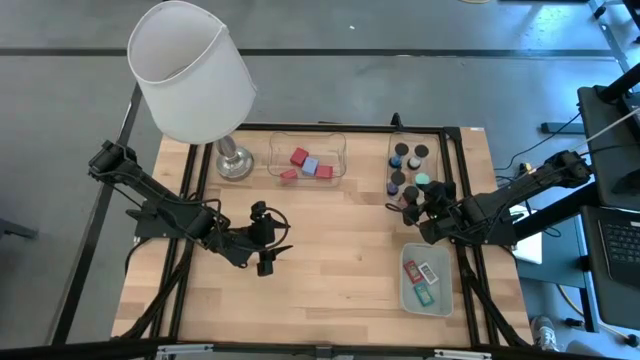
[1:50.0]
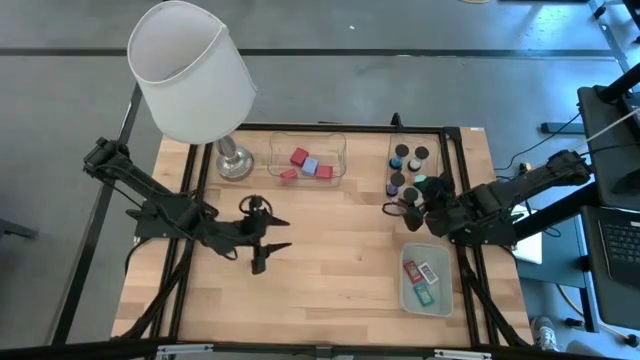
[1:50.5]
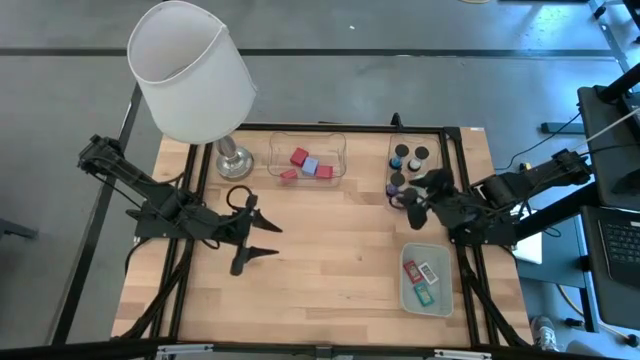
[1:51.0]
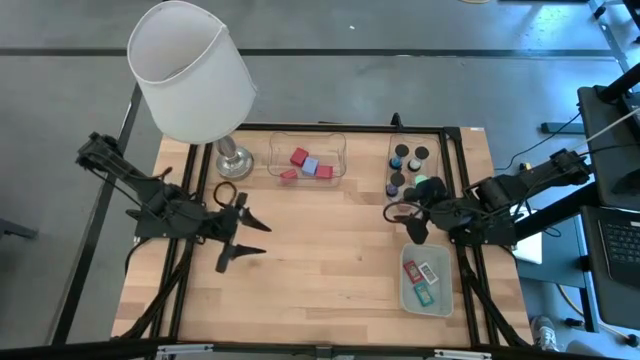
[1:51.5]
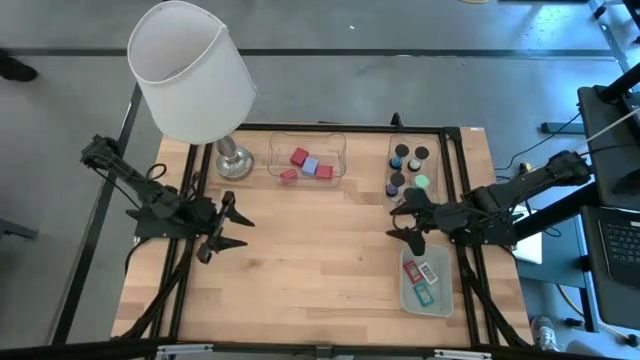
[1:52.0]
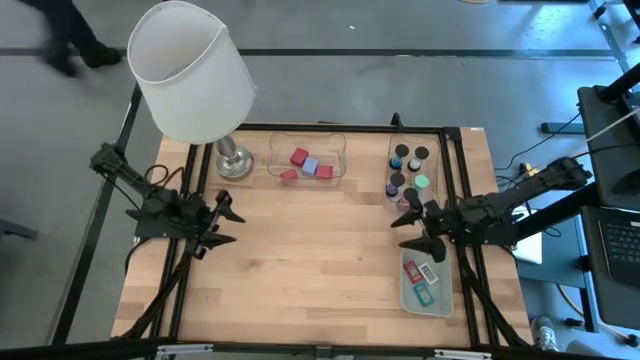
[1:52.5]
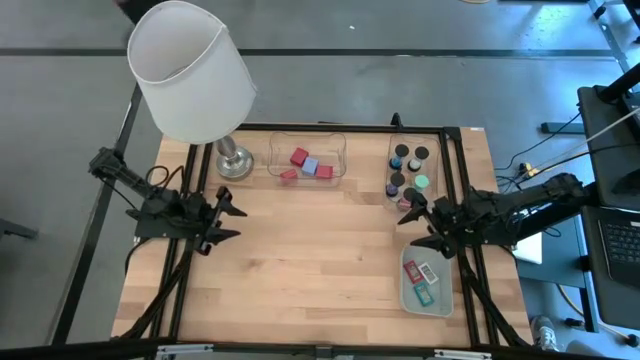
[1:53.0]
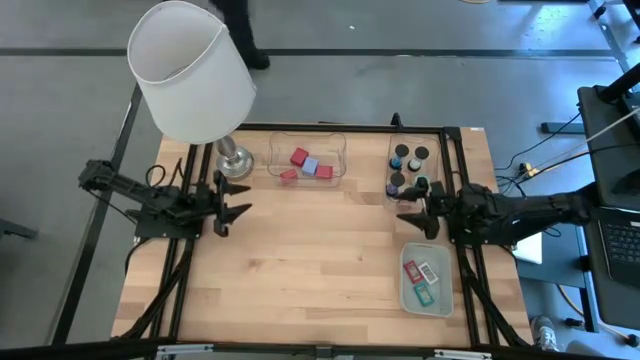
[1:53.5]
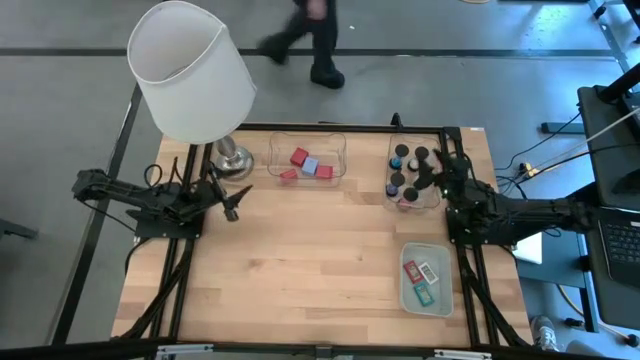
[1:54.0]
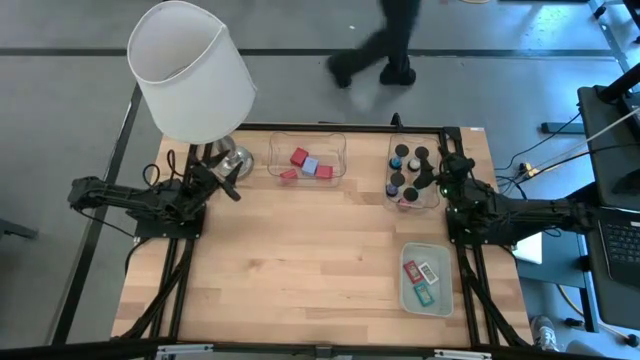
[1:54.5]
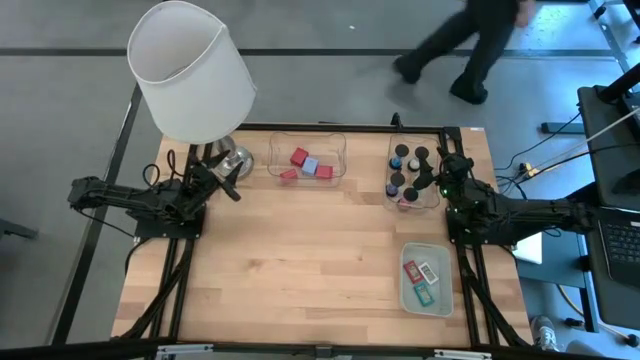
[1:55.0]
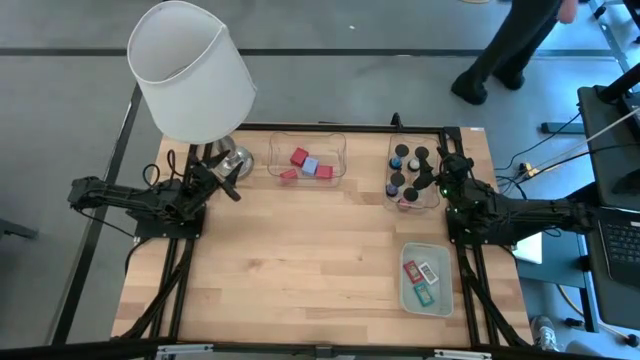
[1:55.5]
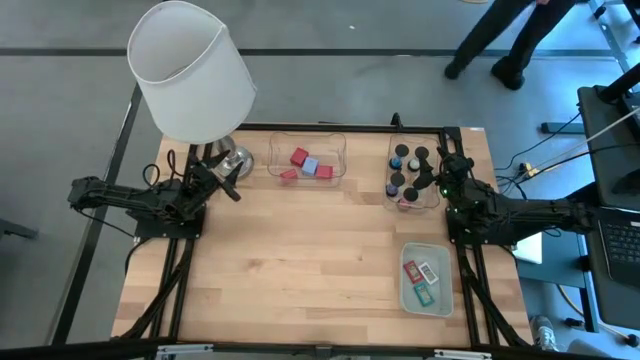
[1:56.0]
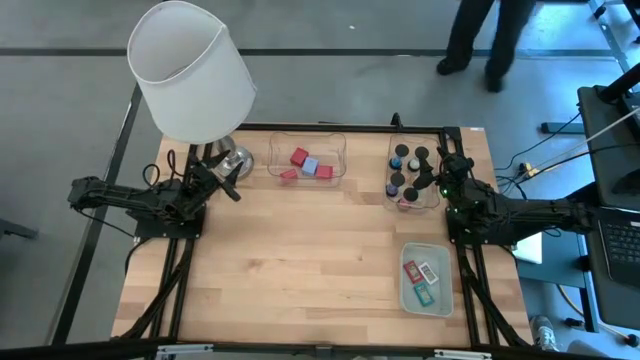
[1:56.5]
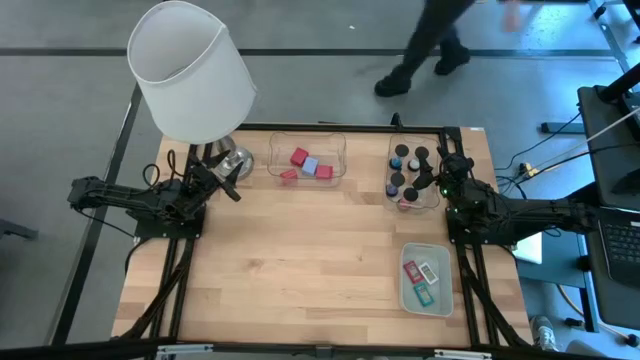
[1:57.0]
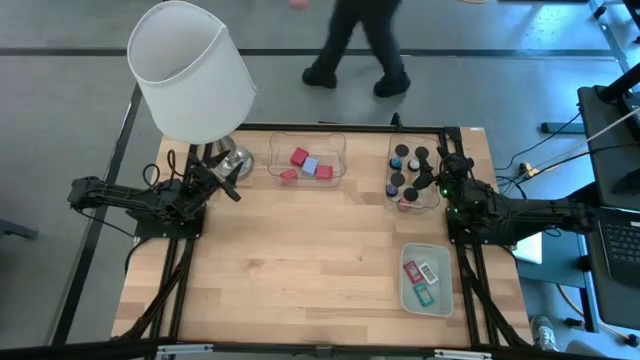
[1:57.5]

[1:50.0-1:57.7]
Task: Pick & Place Office items
Return to Home Position

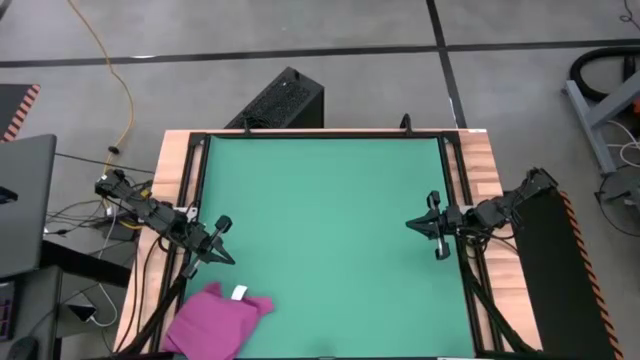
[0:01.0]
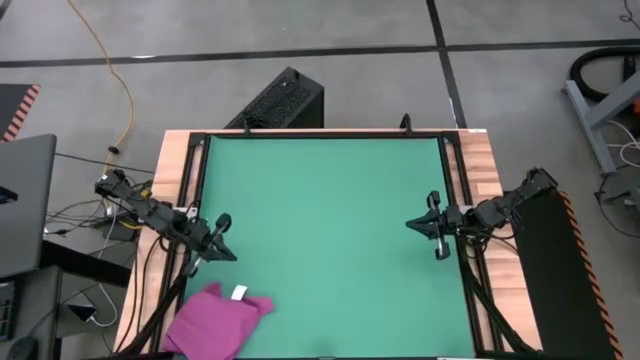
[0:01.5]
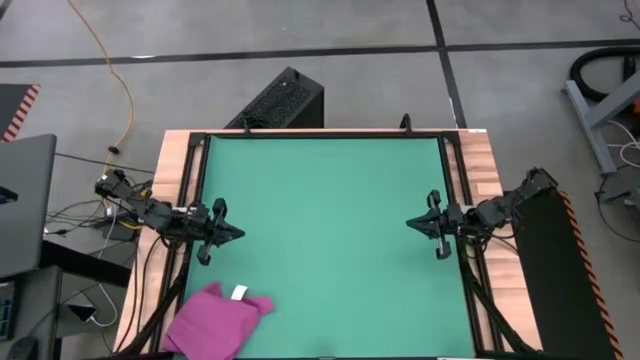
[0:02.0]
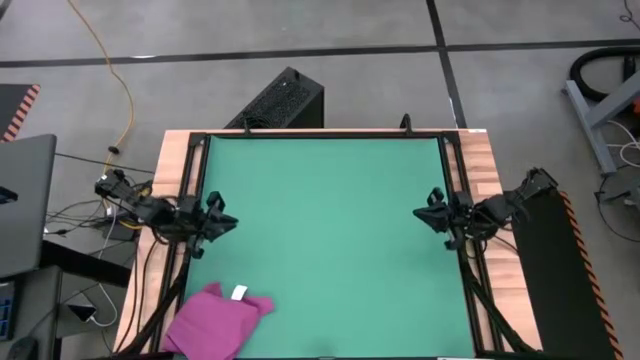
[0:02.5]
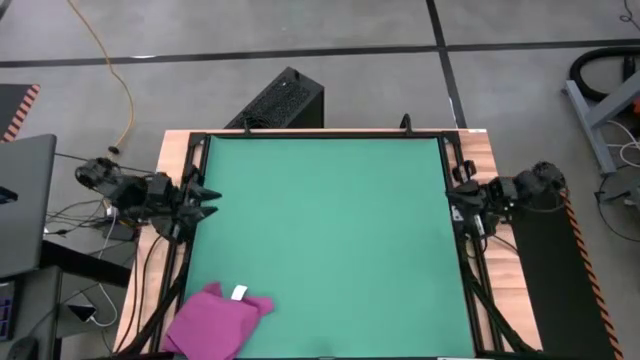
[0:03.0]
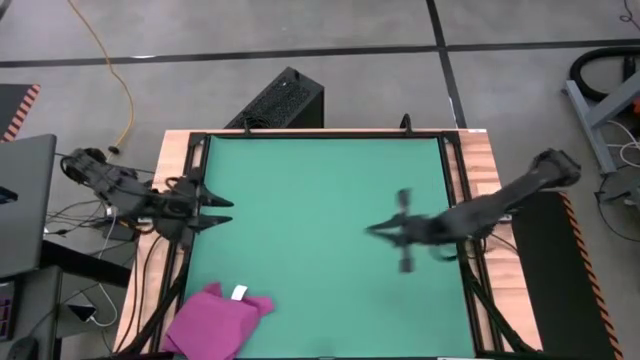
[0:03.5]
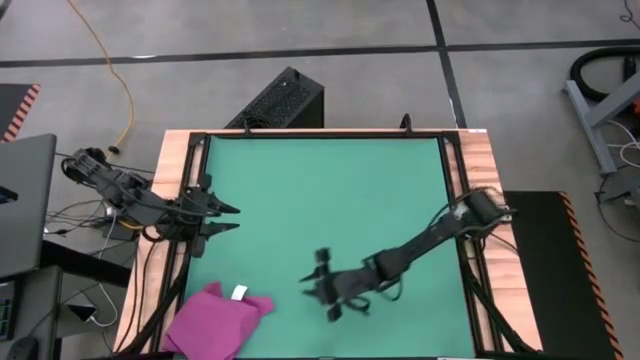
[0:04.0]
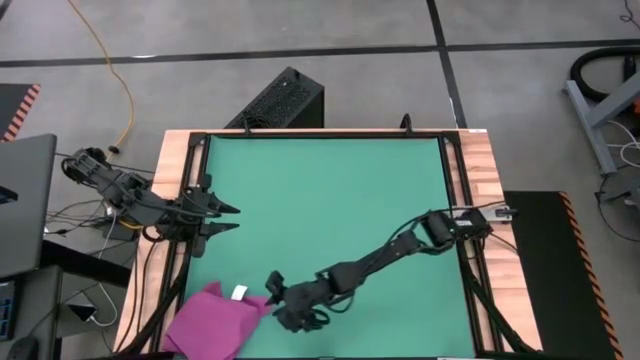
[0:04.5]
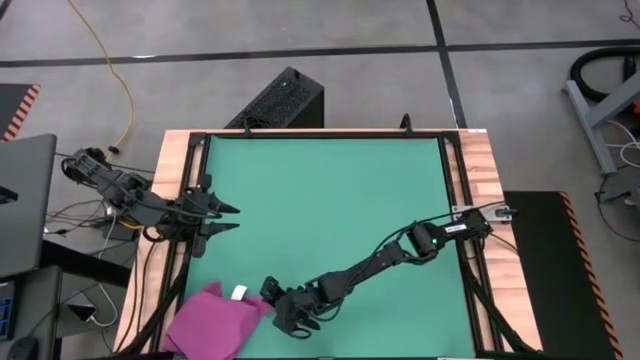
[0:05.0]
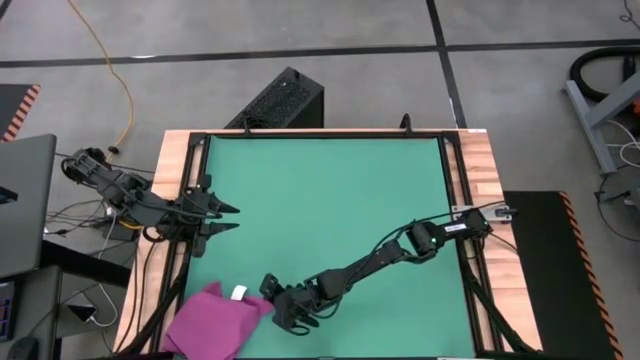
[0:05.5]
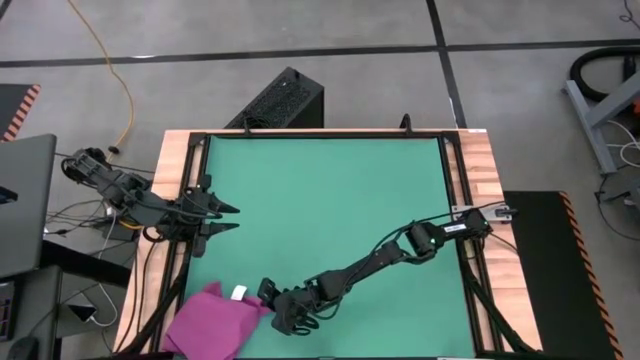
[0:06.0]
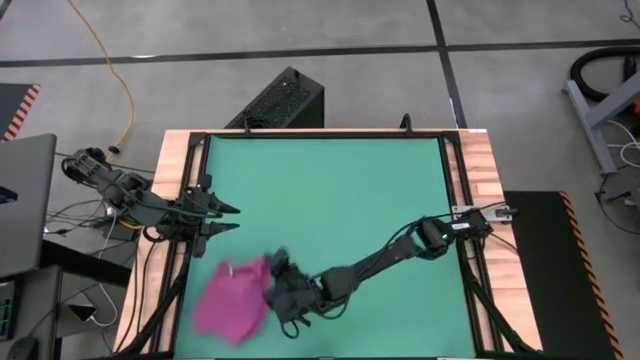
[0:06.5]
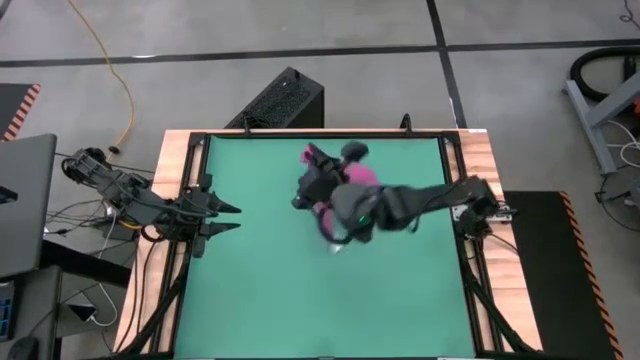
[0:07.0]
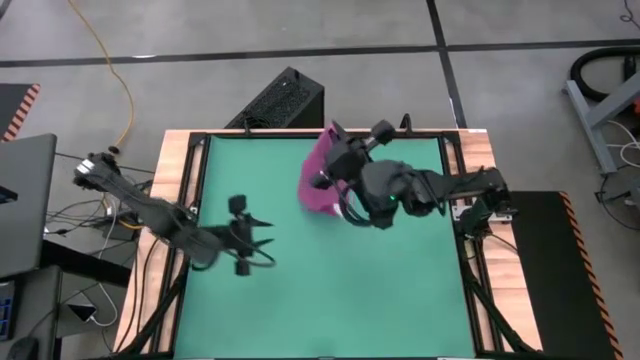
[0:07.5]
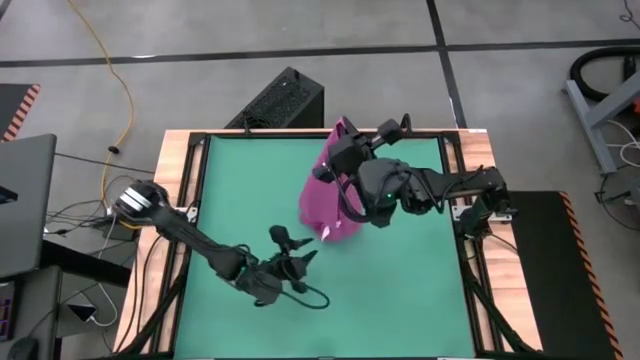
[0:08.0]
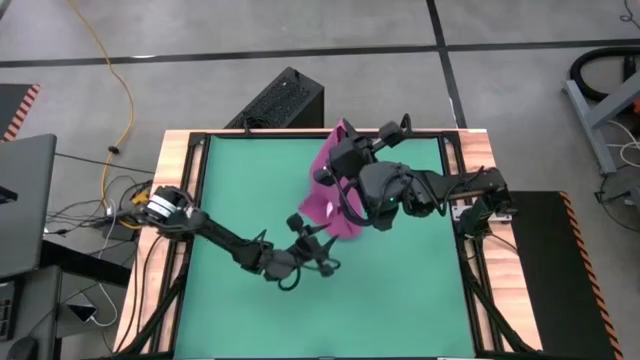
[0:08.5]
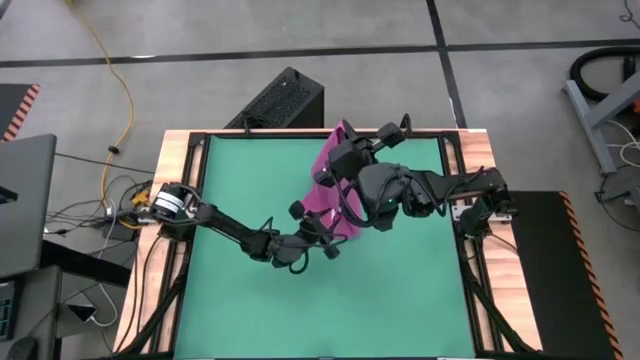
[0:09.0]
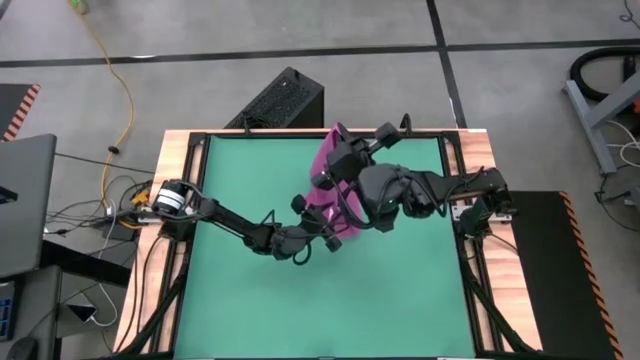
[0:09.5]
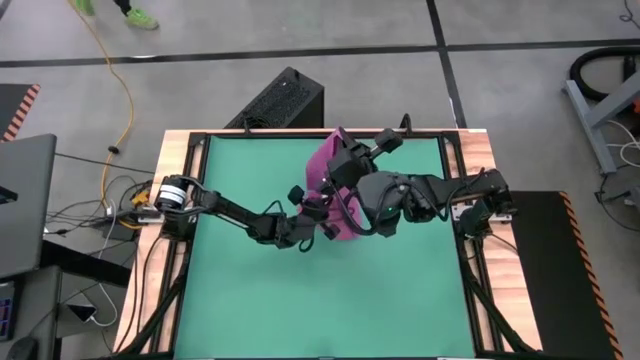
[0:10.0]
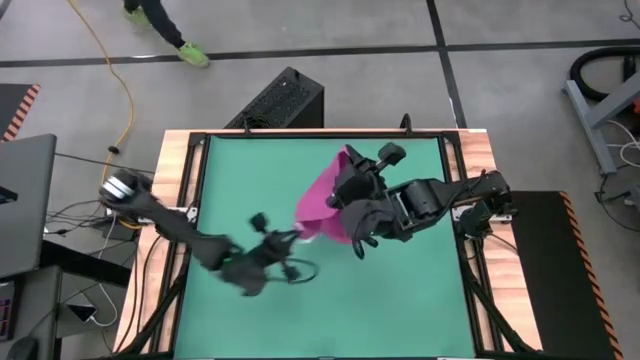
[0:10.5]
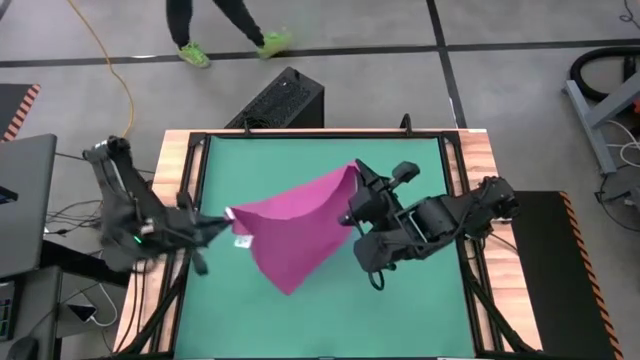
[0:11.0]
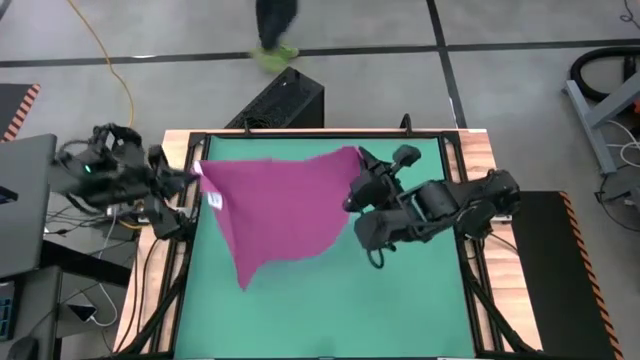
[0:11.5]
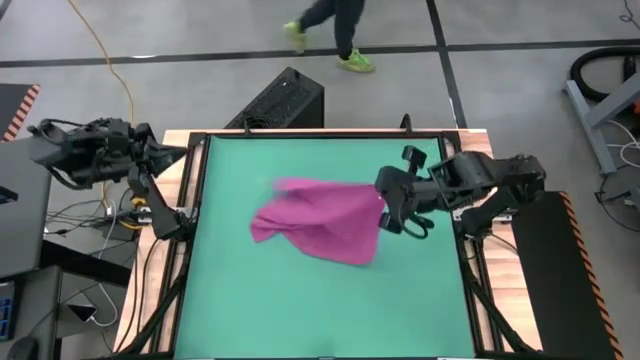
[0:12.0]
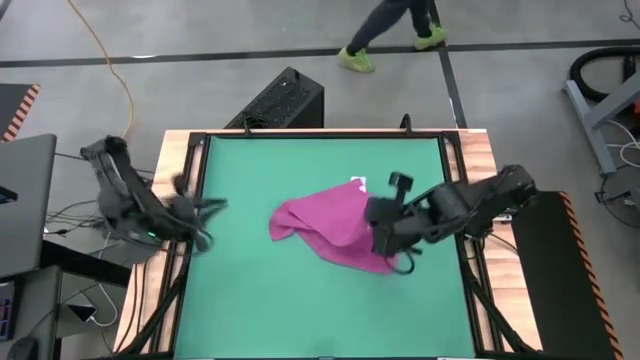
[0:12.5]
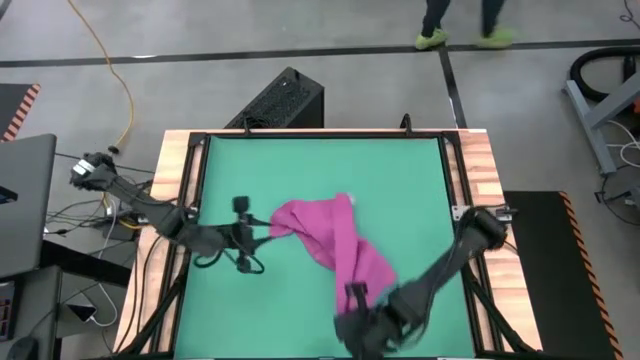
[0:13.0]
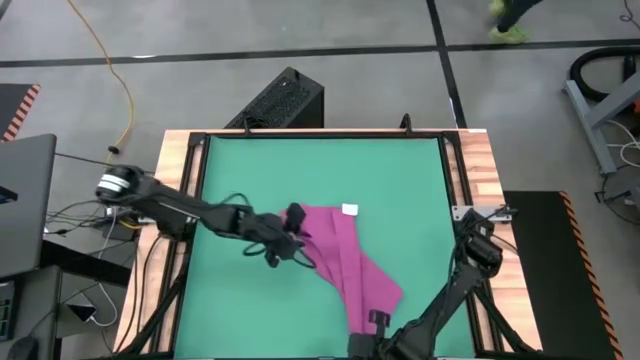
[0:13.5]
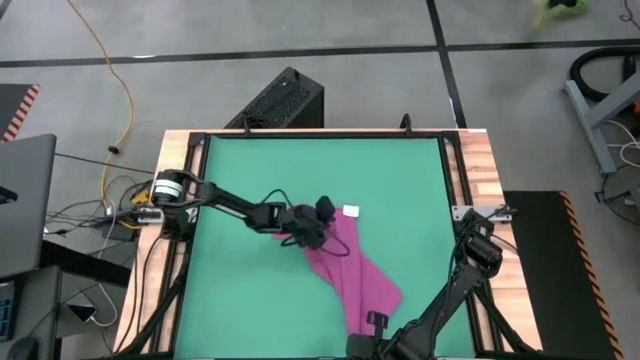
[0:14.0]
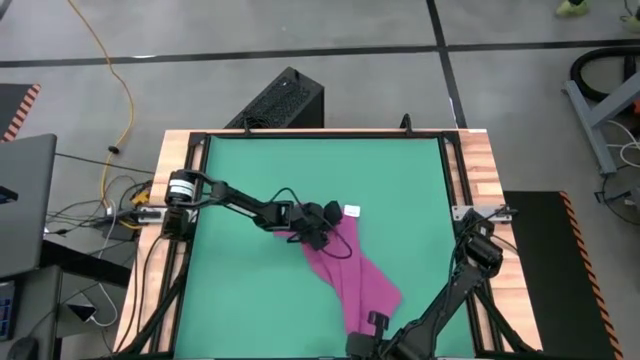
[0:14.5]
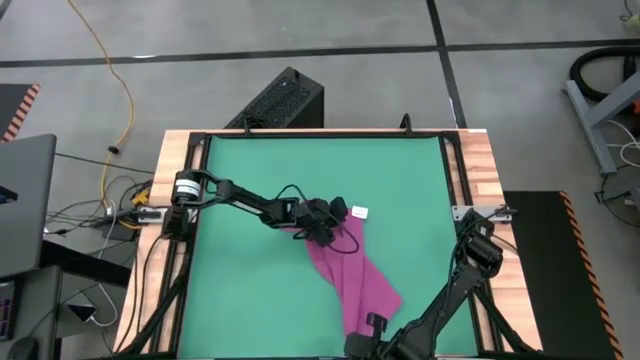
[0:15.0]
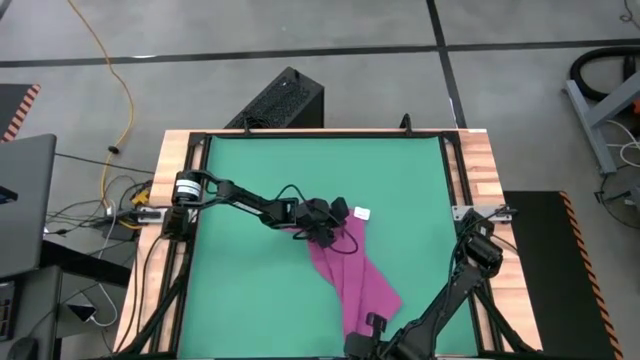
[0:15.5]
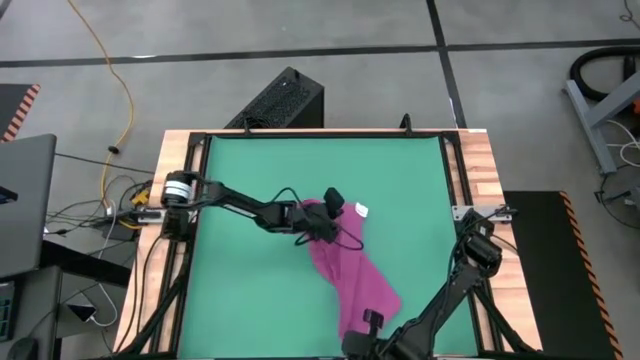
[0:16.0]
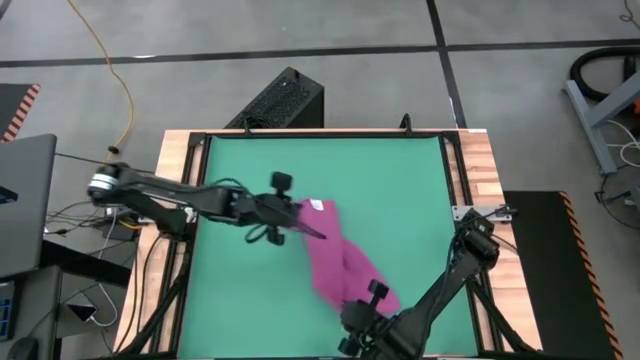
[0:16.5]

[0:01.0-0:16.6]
Task: Roll towel
Roll the pink towel
